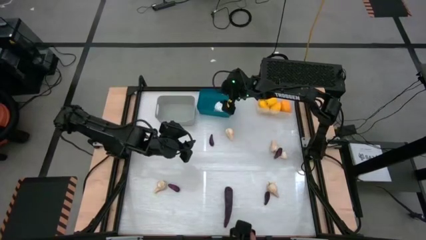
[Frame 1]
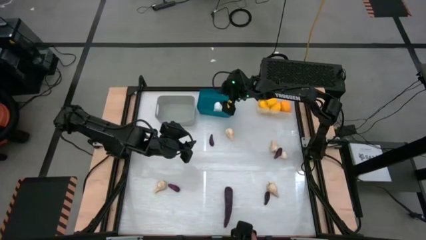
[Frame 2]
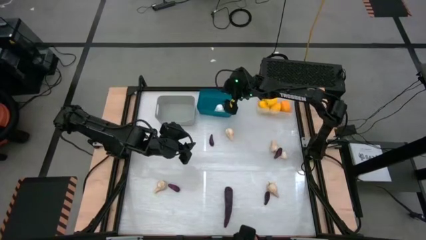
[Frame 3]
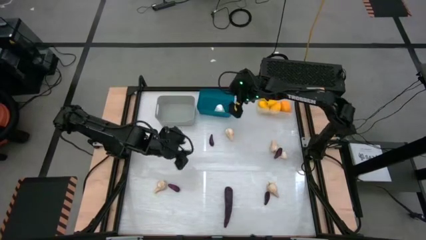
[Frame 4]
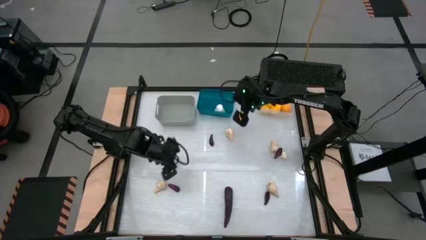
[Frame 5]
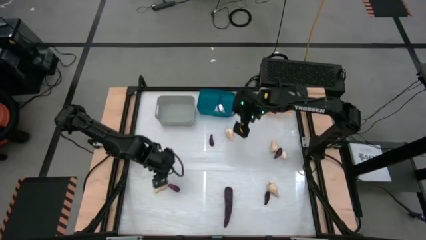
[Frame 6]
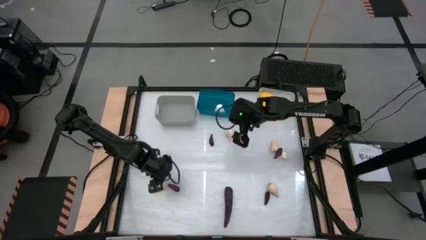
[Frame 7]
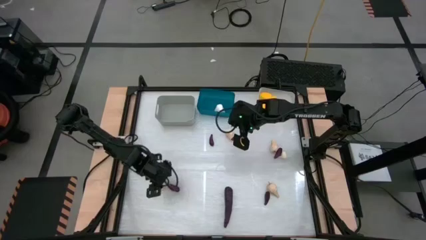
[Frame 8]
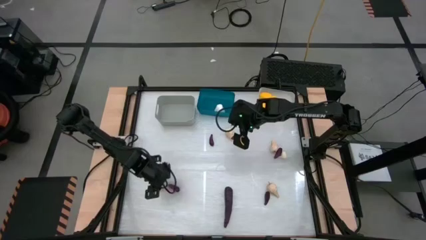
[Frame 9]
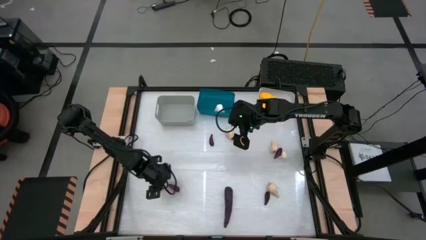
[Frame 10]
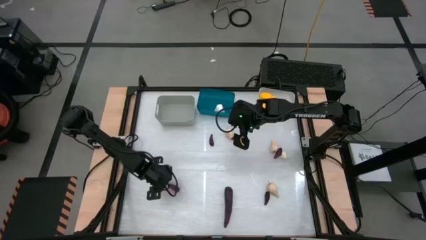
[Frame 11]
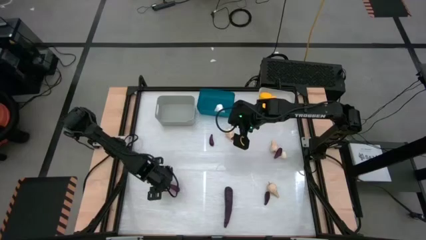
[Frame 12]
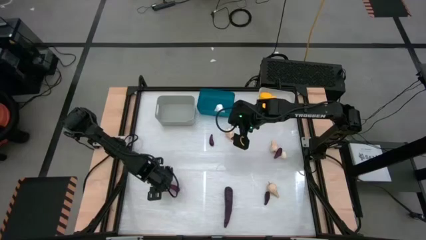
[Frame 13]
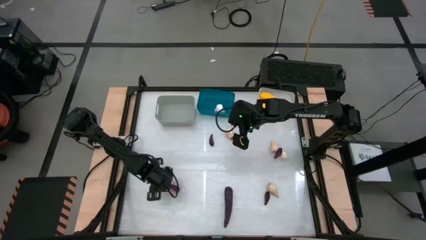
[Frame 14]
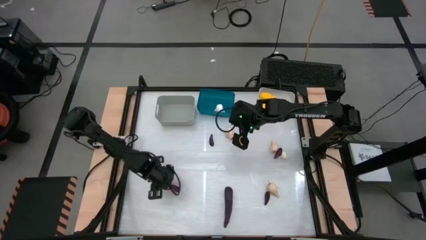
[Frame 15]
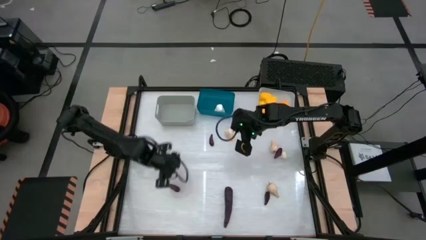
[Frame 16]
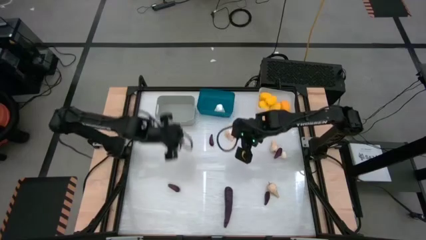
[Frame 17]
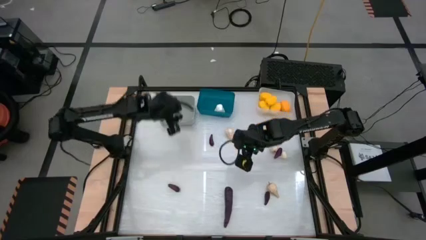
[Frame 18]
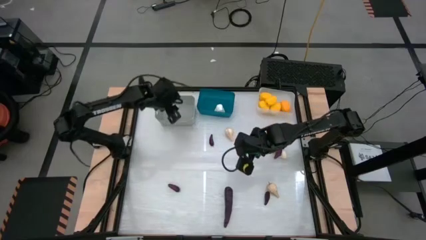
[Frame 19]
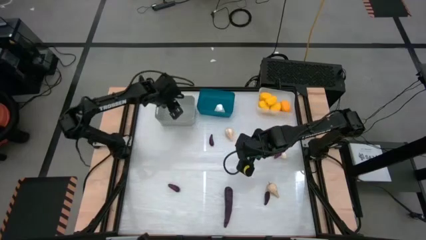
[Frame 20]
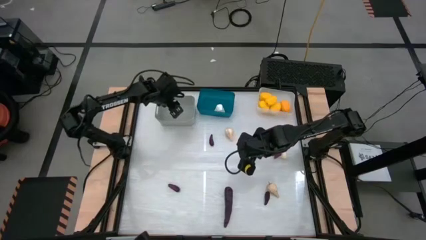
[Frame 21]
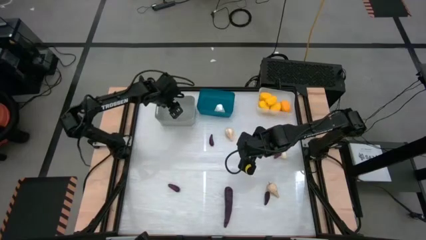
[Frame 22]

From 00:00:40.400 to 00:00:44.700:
Task: Sort produce into baskets
Put the garlic into the gray bin

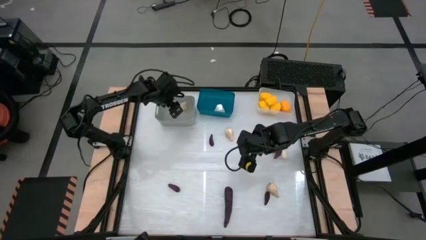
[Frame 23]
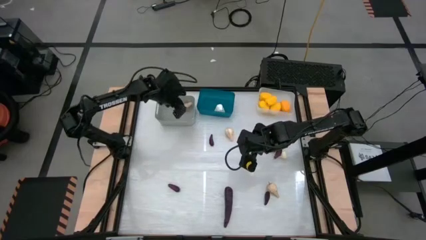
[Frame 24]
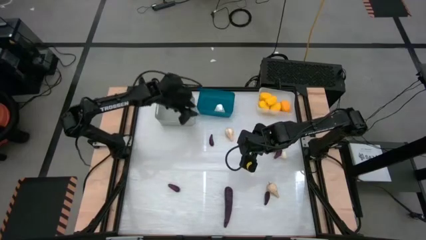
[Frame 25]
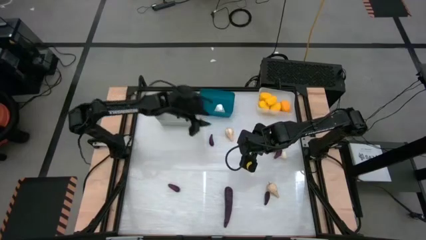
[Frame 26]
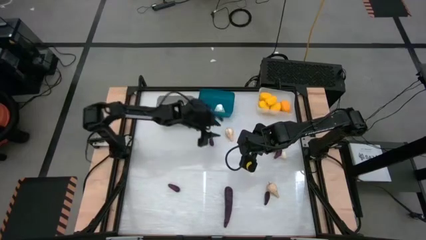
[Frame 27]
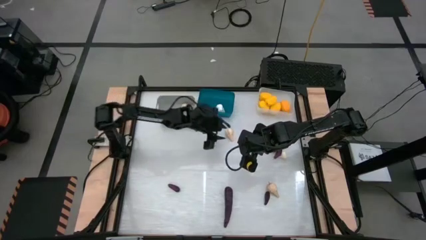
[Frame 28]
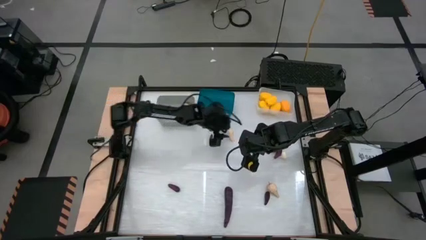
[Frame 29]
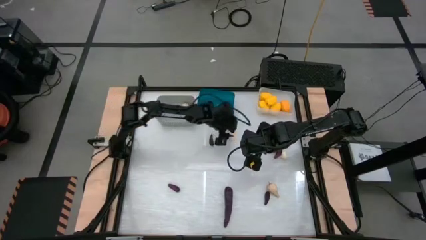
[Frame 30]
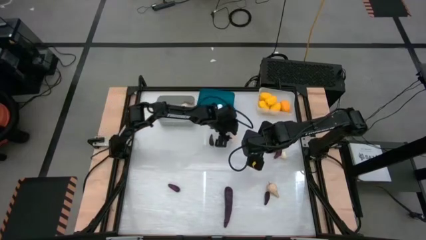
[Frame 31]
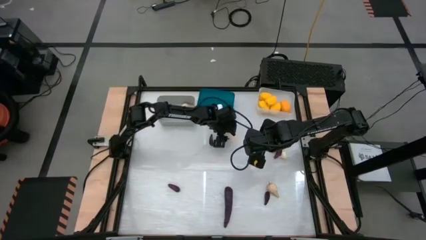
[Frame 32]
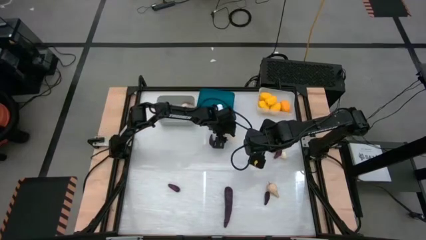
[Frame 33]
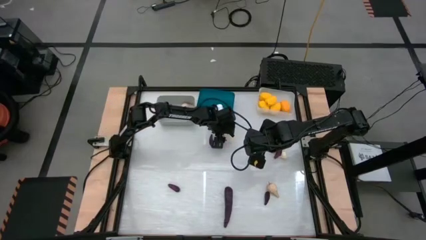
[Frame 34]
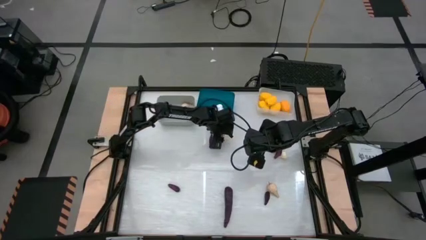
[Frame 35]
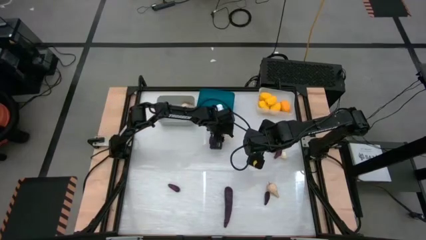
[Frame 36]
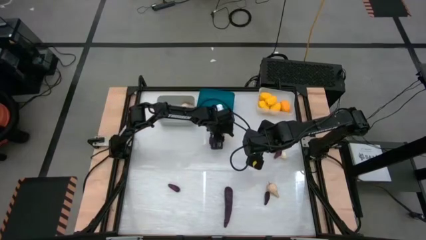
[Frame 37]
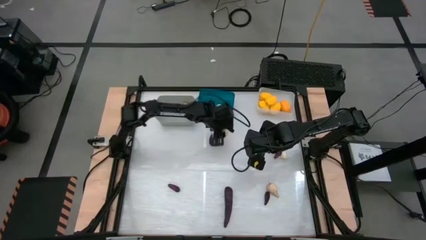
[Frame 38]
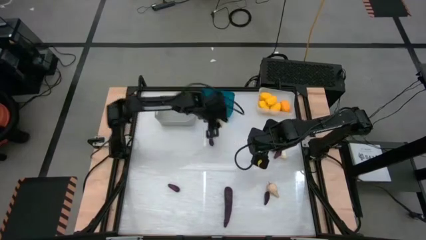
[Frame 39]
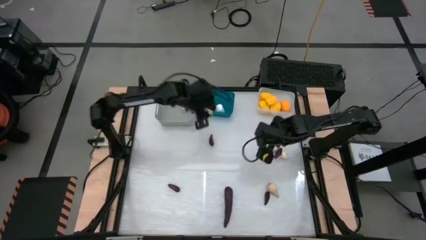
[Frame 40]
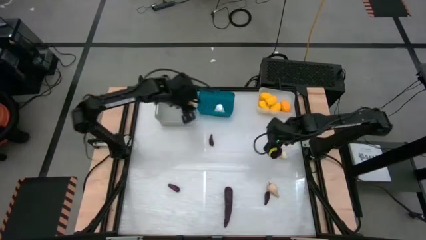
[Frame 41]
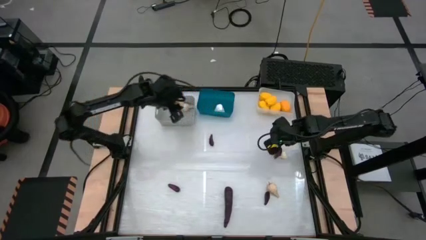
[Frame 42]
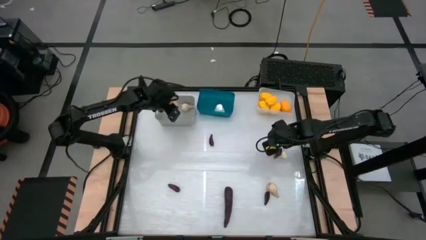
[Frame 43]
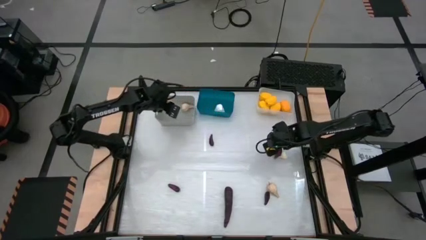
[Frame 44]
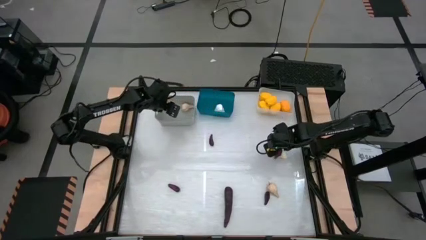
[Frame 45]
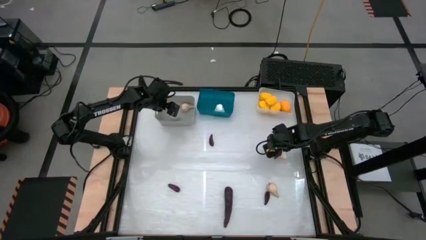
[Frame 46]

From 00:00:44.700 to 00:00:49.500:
Put the garlic into the gray bin

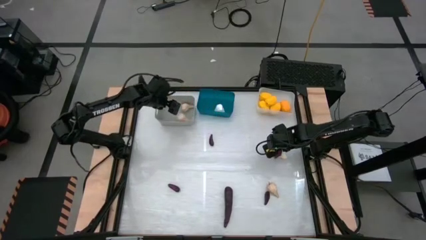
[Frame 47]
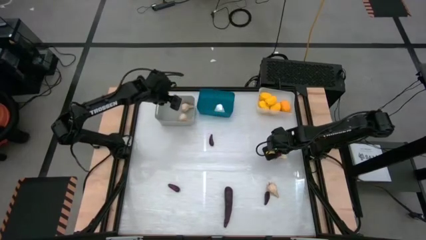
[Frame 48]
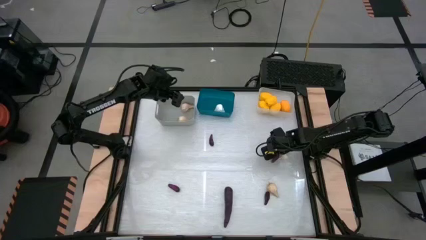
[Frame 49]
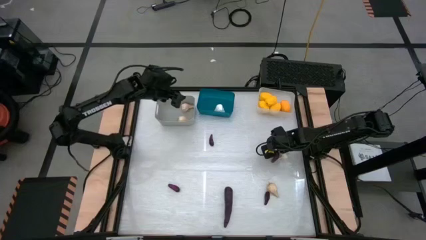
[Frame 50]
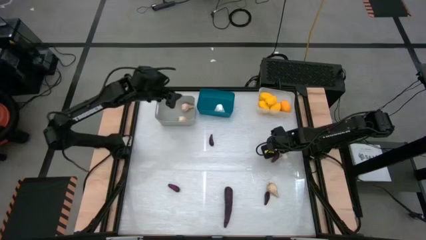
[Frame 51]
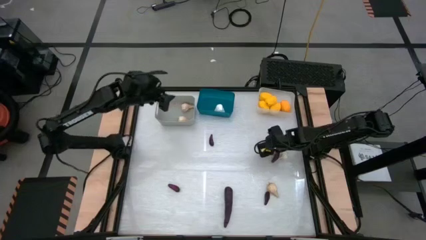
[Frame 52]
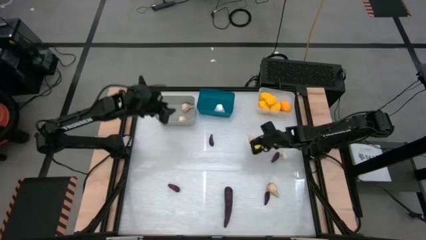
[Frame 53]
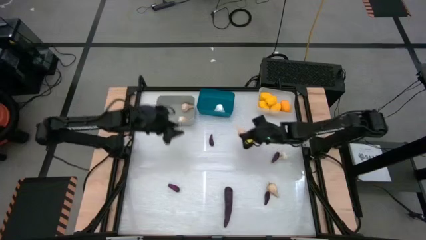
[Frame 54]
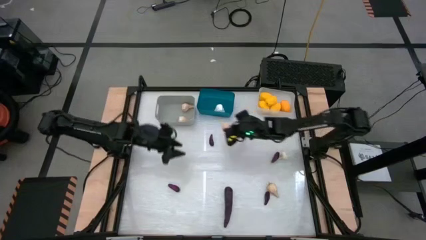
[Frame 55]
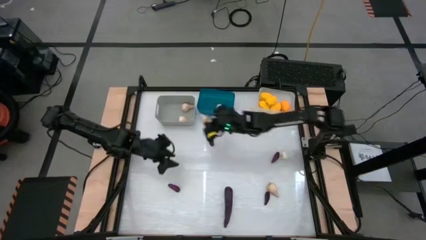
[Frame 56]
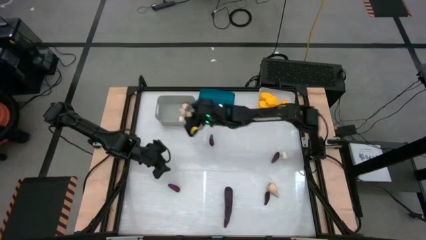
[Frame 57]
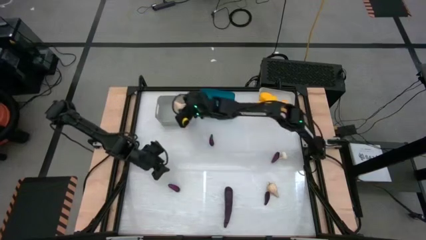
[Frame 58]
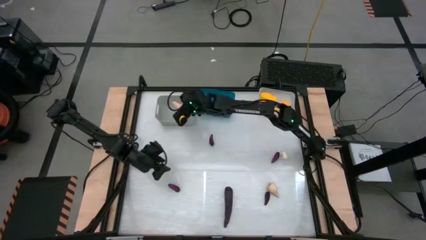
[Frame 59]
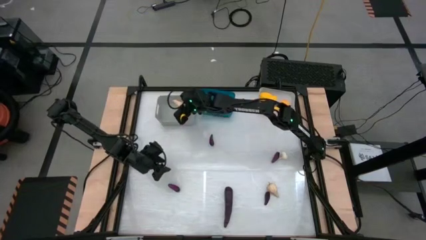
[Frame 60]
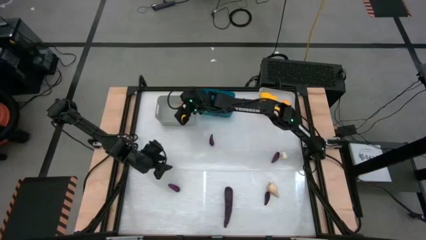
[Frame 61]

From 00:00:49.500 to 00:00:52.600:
Put the garlic into the gray bin

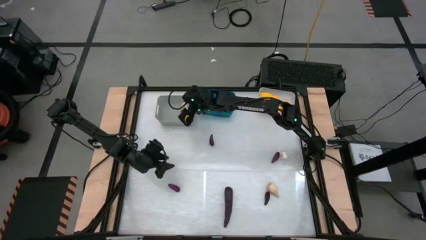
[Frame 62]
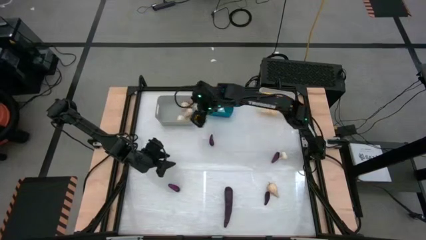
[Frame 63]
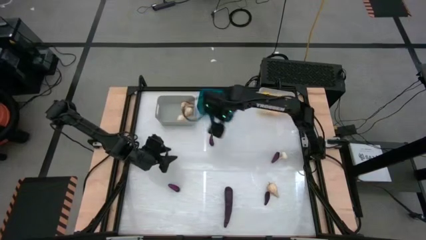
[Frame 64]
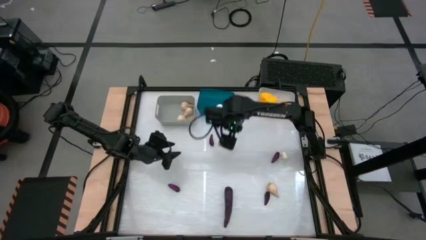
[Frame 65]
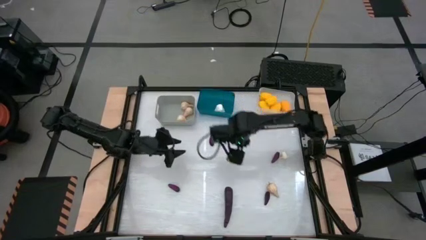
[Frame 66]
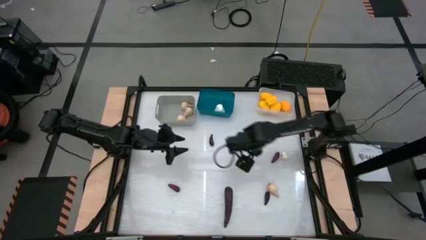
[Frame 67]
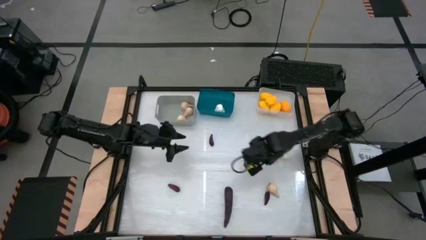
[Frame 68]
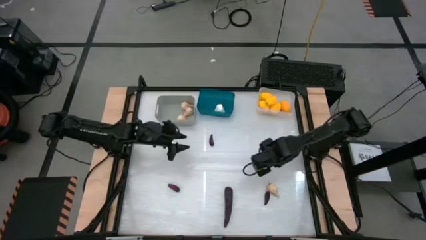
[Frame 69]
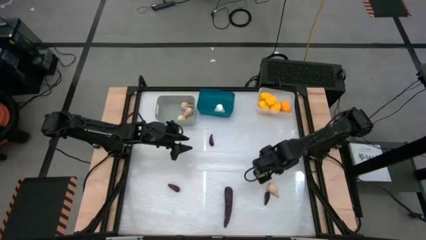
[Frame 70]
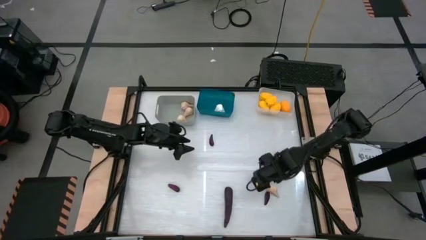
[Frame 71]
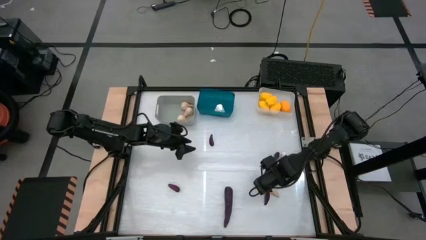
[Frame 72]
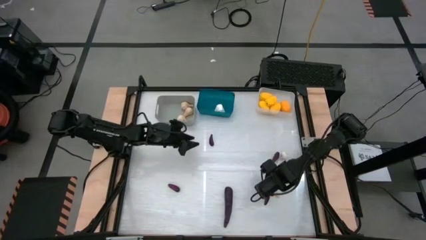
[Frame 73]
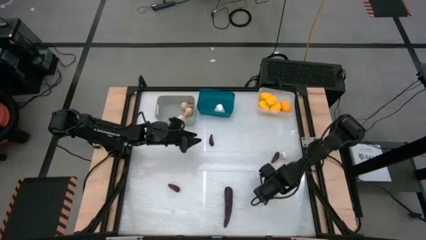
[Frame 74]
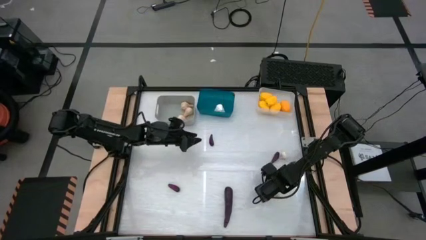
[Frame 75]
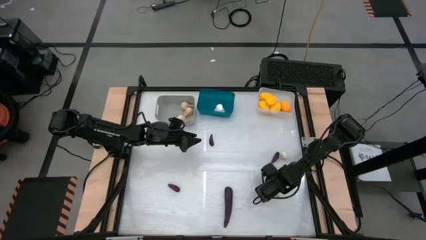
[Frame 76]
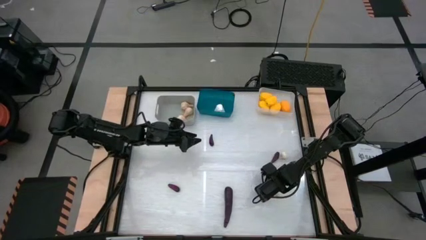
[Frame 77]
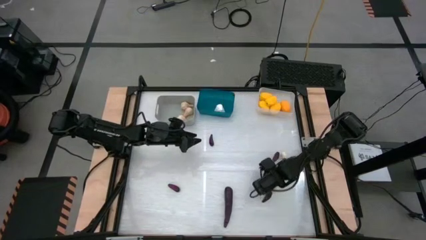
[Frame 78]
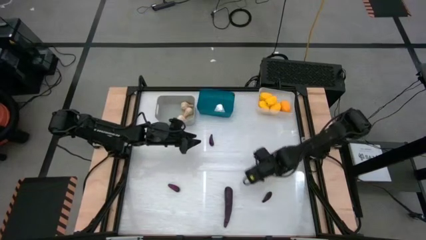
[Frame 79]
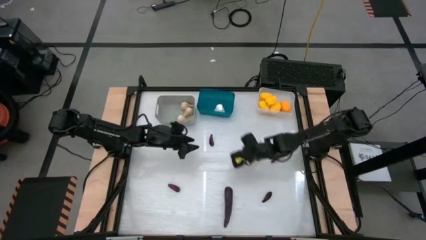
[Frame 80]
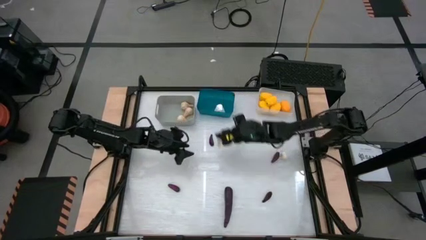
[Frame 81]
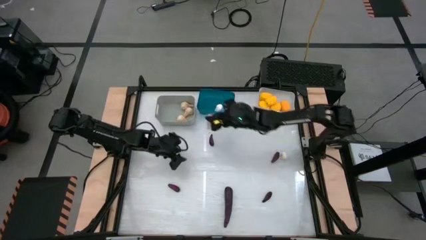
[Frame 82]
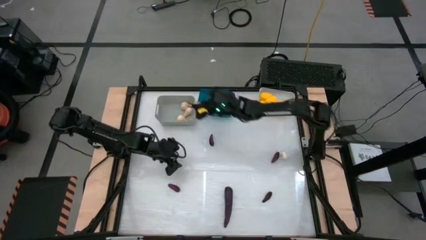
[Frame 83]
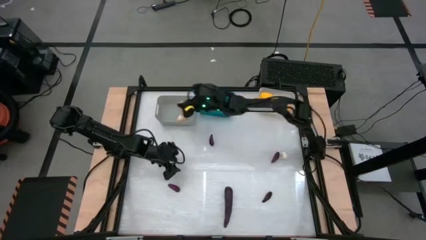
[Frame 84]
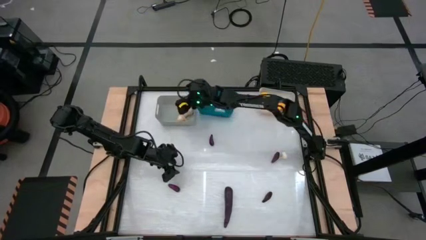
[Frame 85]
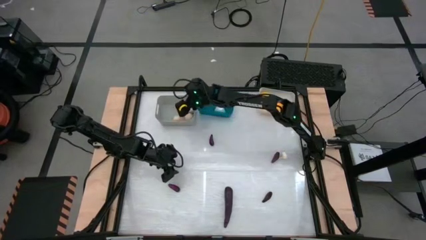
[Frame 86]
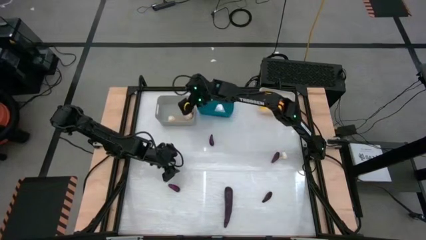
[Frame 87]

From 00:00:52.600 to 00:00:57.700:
Put the garlic into the gray bin
